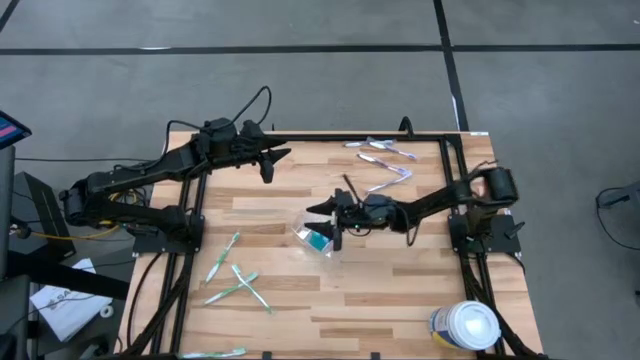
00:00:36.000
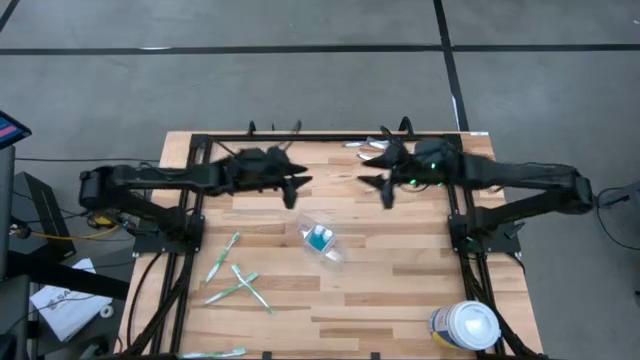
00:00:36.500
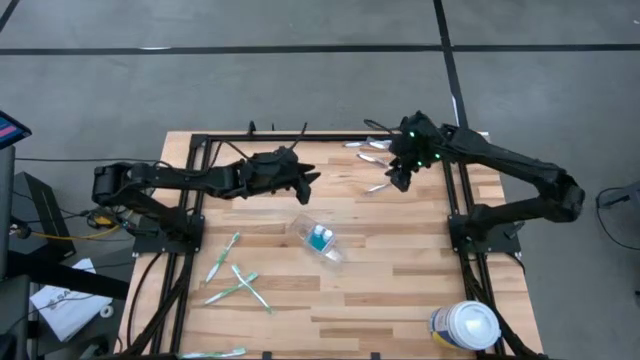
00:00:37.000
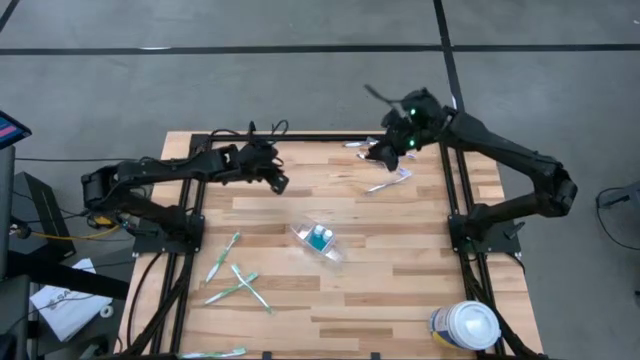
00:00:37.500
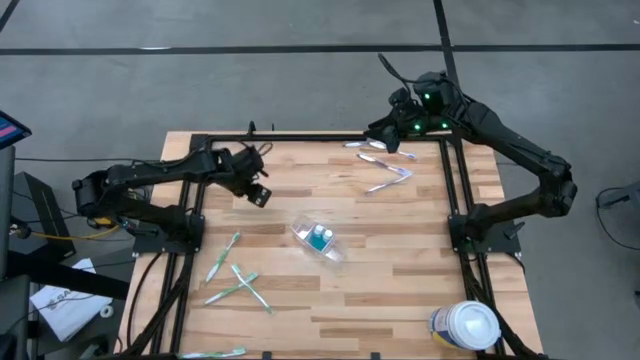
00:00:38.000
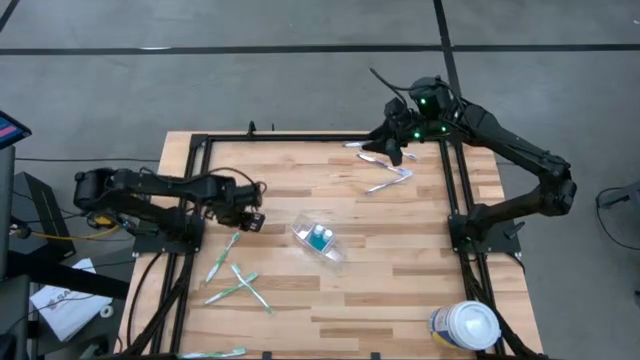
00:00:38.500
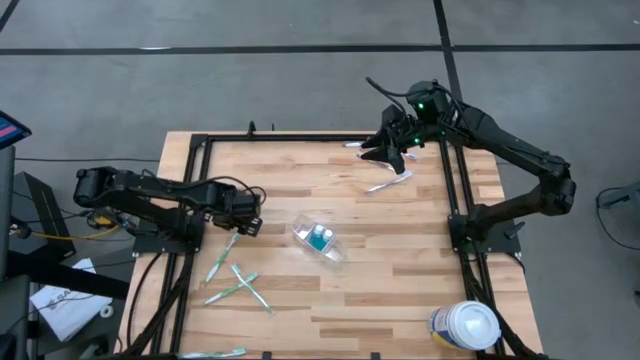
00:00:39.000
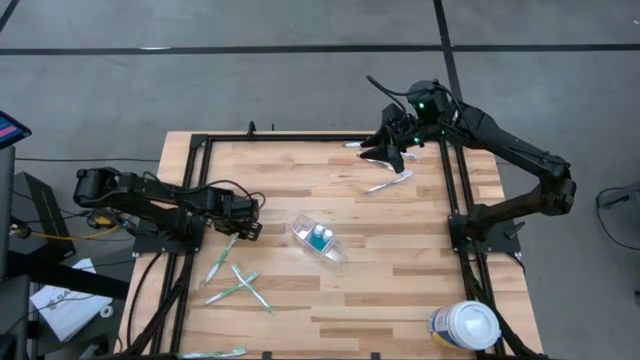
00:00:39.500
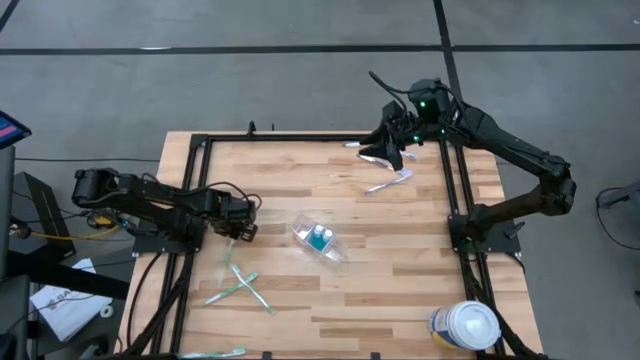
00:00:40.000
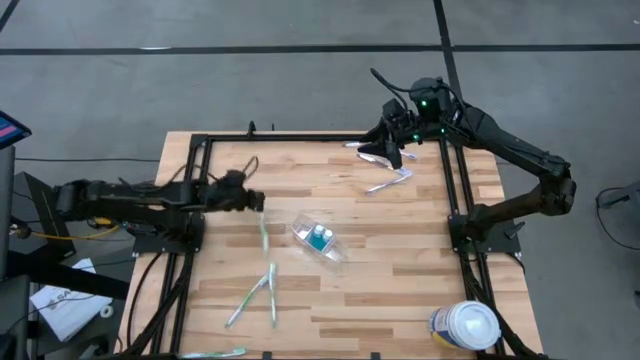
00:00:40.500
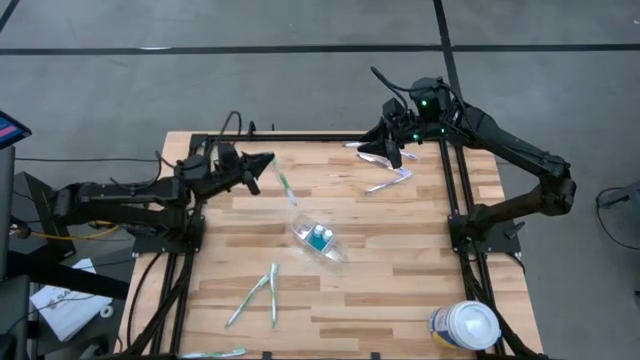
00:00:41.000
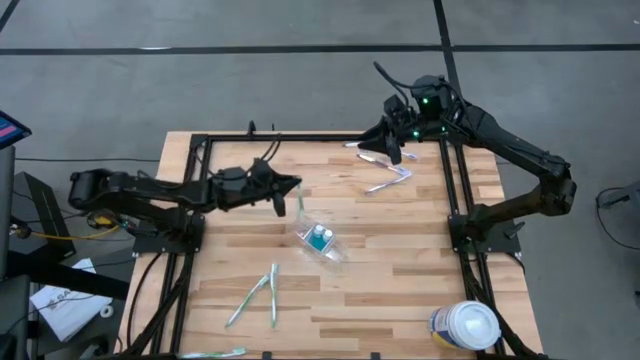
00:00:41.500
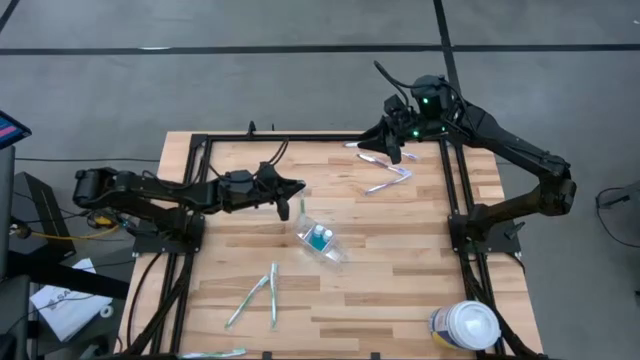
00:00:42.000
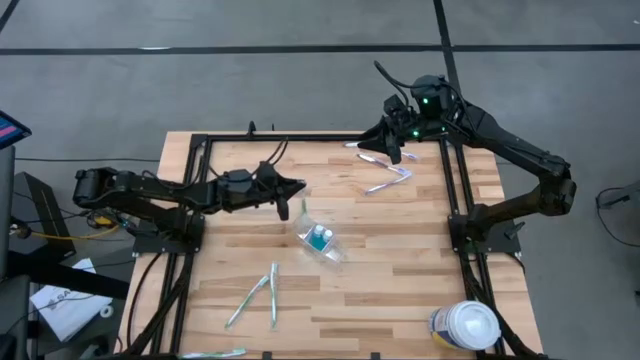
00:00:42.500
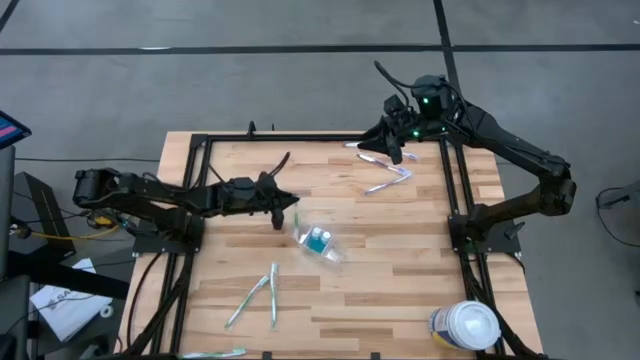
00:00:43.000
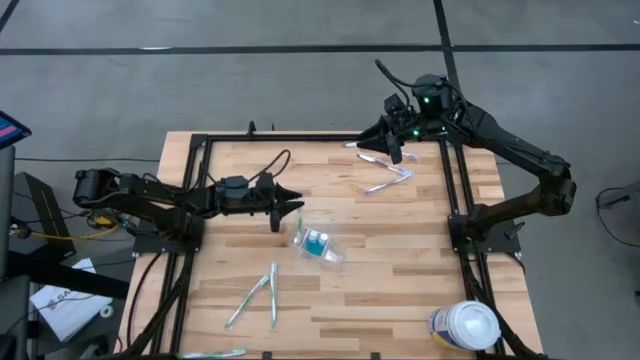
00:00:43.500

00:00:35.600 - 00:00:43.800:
Task: Pick & Place toothbrushing station
Put the green toothbrush into the transparent organizer

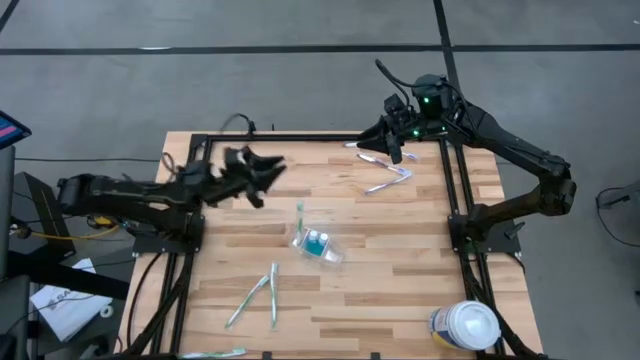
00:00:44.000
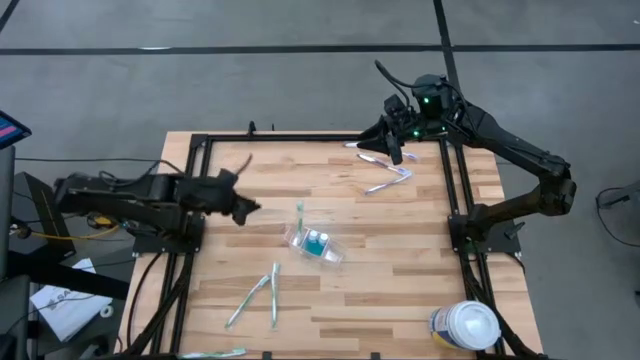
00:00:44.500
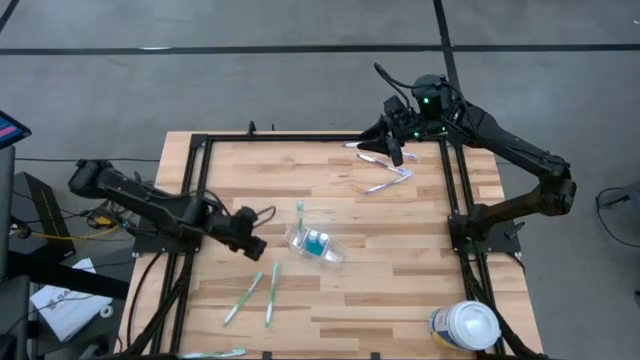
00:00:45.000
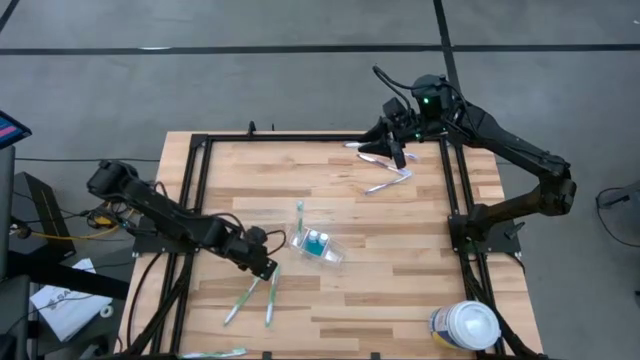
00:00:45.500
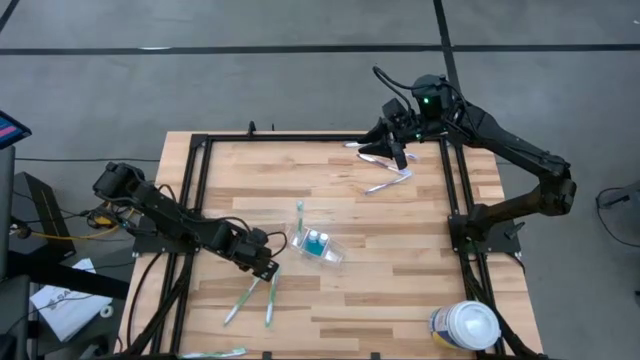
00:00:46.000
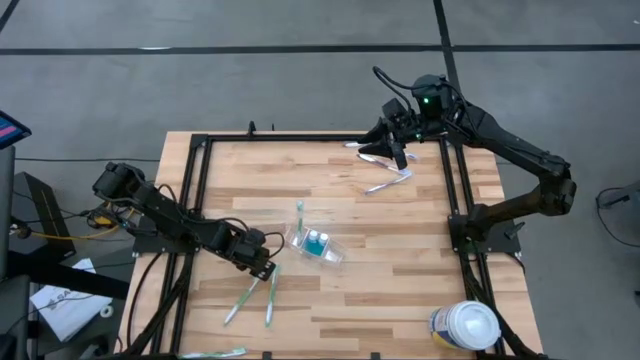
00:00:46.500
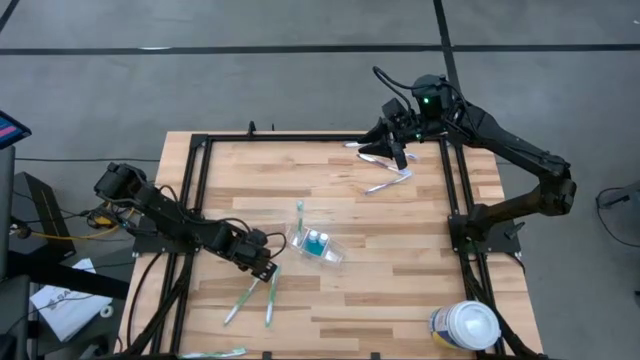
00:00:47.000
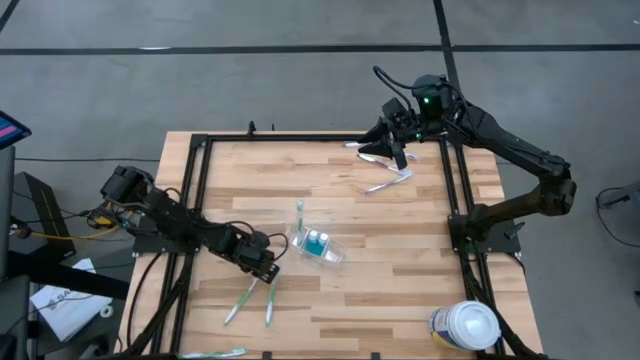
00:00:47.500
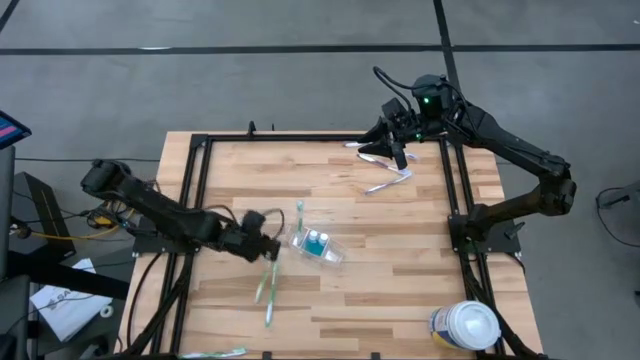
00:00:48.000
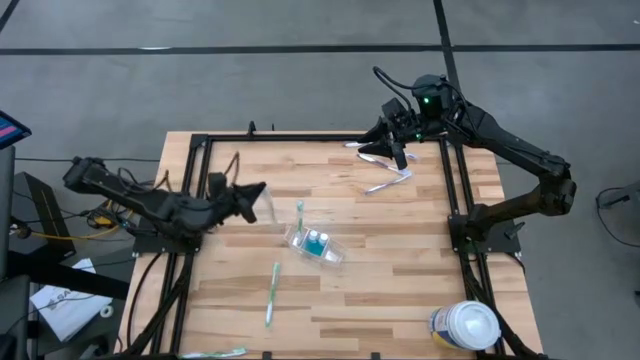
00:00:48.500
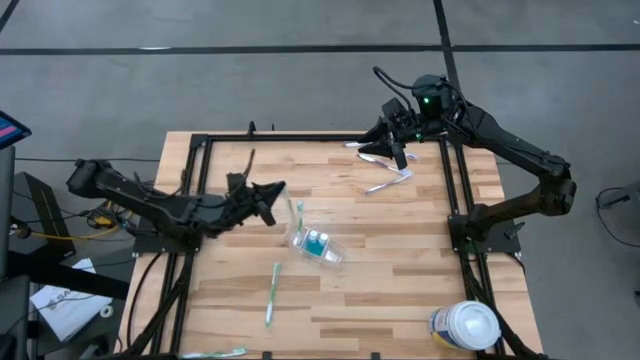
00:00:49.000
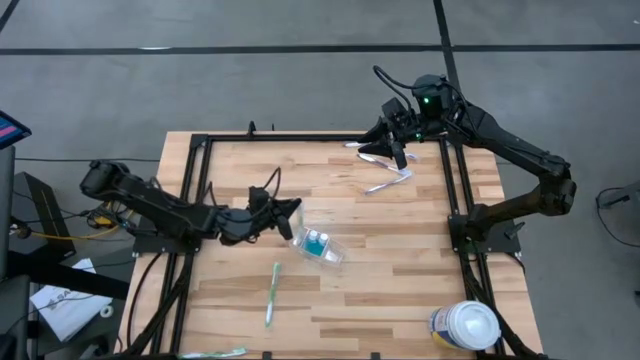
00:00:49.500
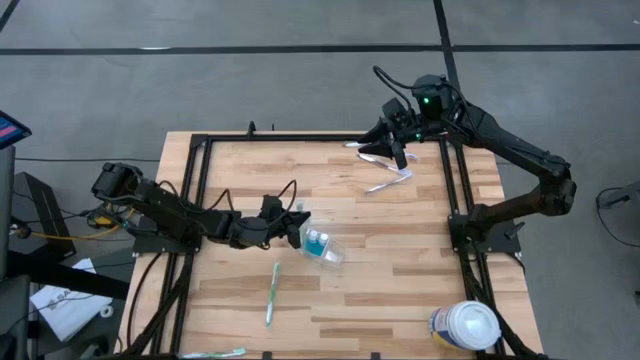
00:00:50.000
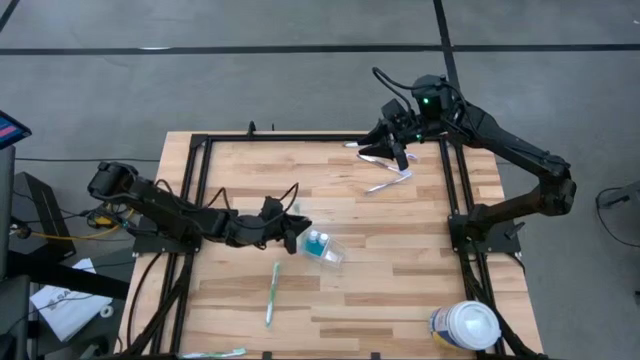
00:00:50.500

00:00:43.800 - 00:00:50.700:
Put the green toothbrush into the transparent organizer

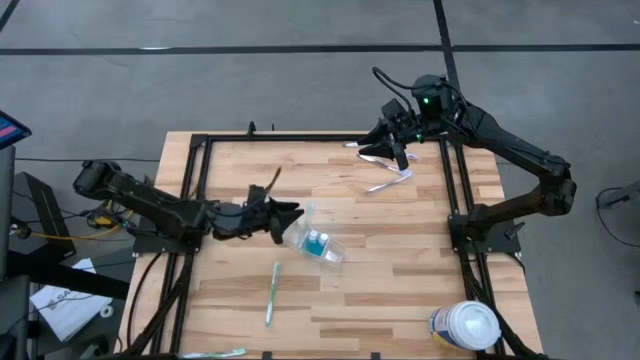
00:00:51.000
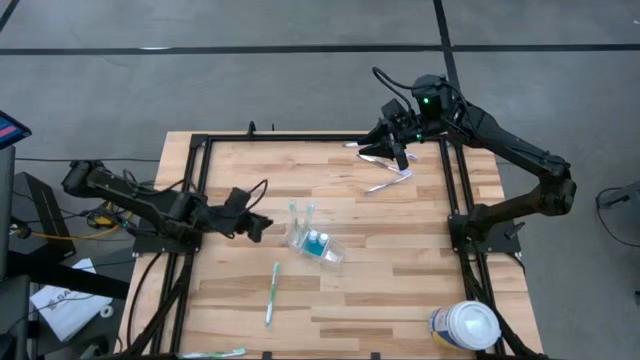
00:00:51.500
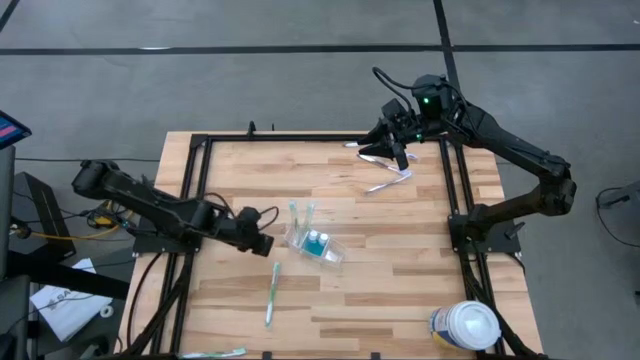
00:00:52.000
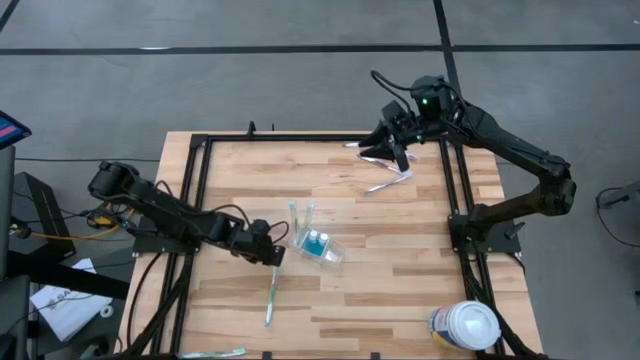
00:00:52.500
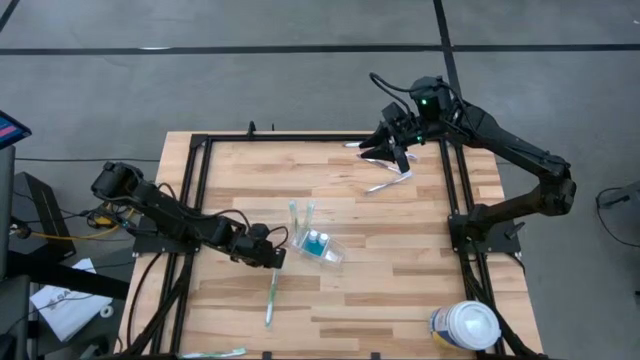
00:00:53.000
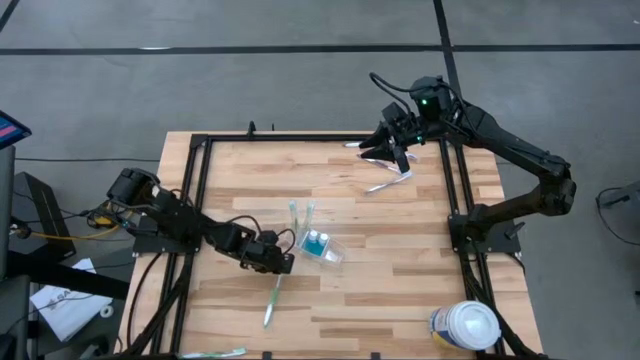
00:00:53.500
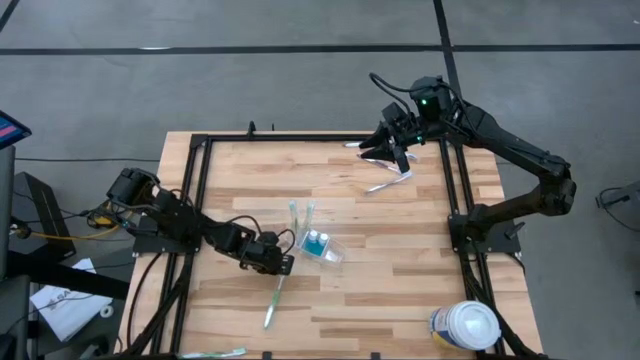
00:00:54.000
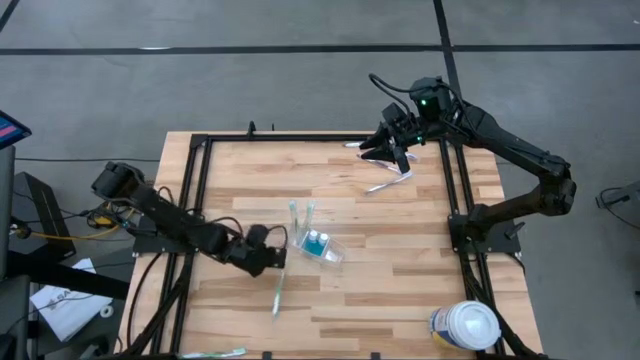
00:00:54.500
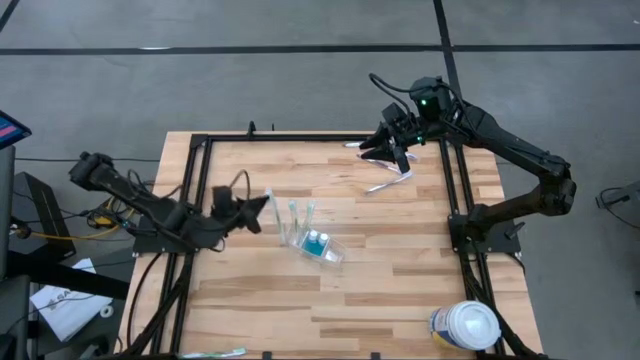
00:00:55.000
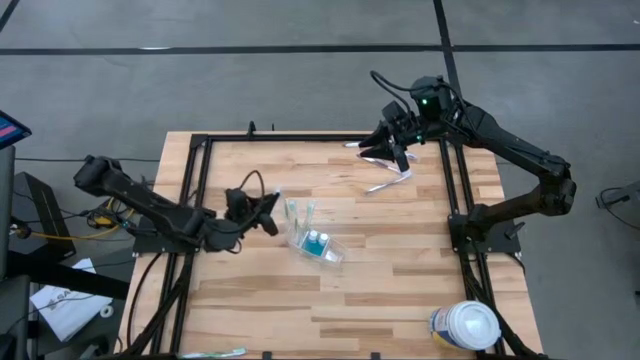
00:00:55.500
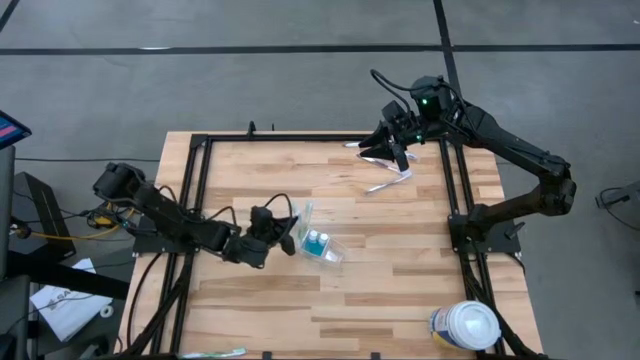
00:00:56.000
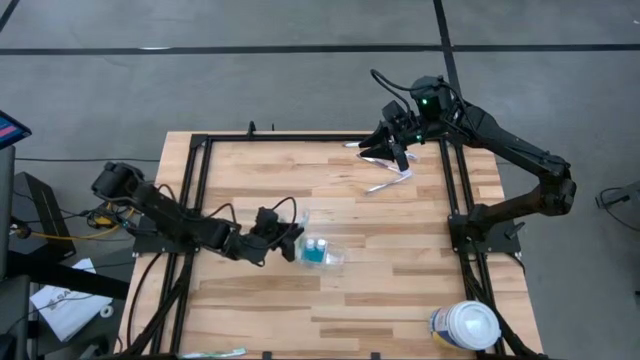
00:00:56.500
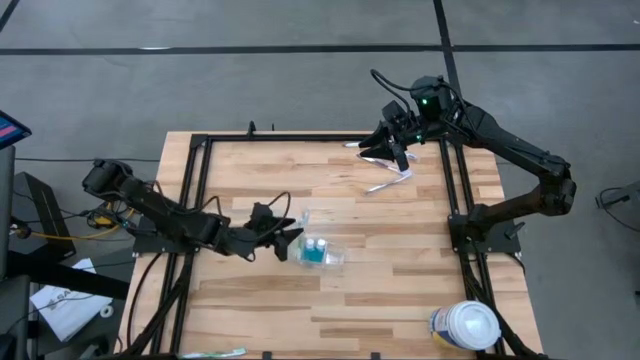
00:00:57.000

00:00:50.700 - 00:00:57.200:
Put the green toothbrush into the transparent organizer
